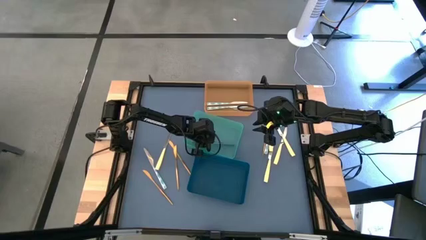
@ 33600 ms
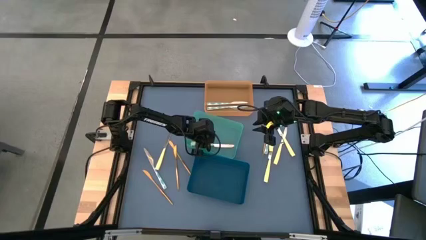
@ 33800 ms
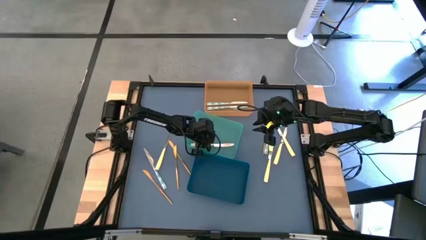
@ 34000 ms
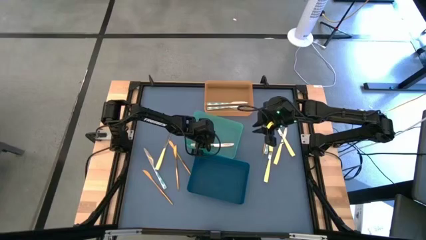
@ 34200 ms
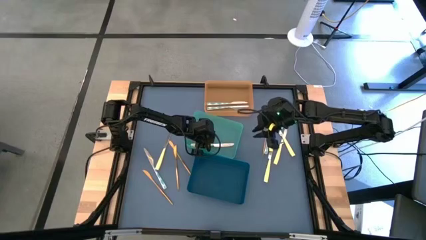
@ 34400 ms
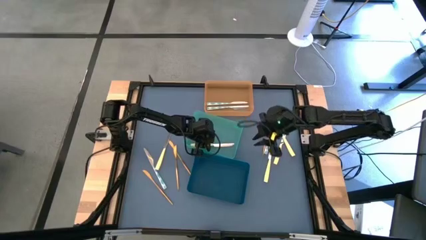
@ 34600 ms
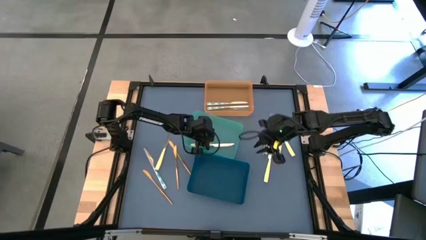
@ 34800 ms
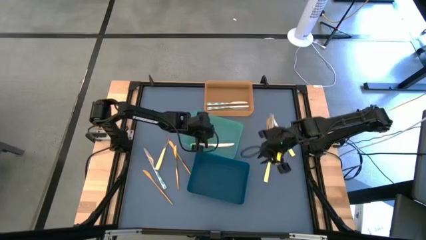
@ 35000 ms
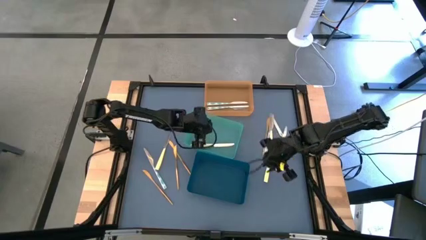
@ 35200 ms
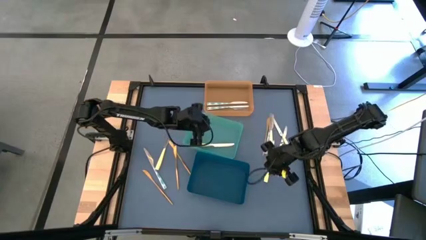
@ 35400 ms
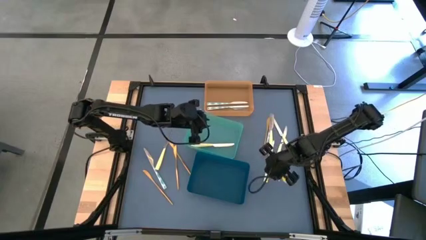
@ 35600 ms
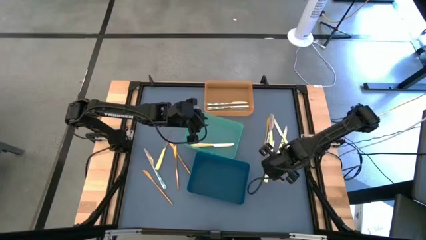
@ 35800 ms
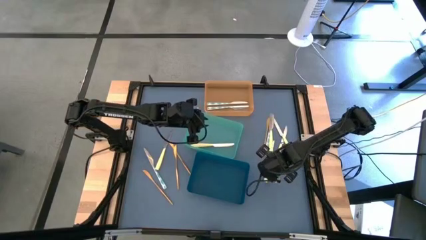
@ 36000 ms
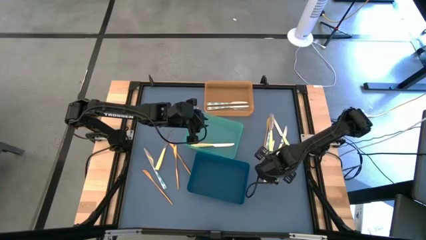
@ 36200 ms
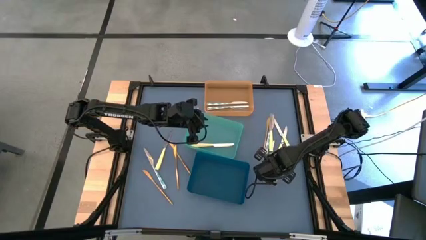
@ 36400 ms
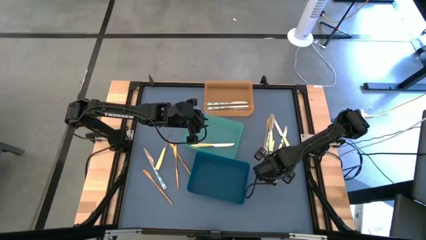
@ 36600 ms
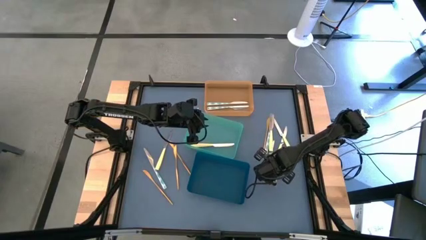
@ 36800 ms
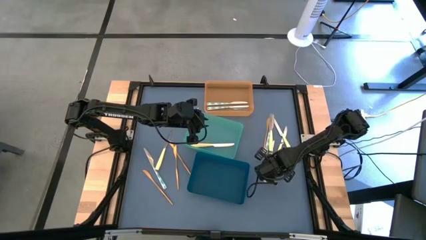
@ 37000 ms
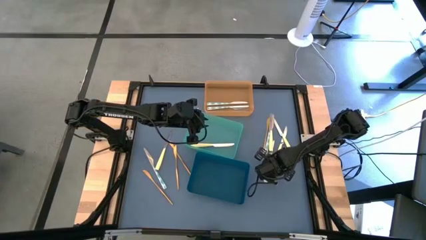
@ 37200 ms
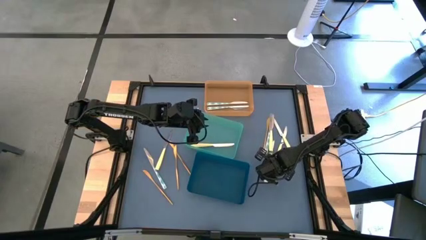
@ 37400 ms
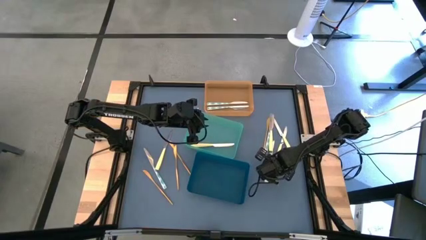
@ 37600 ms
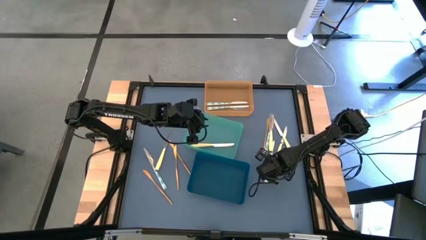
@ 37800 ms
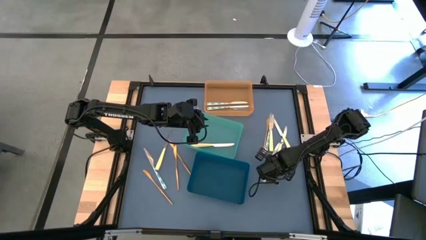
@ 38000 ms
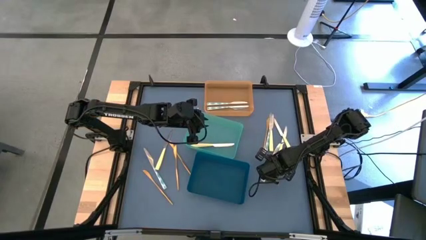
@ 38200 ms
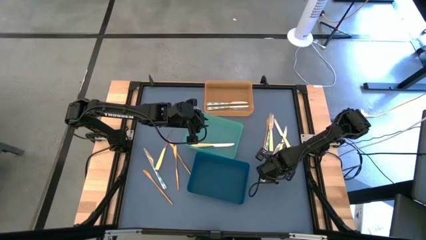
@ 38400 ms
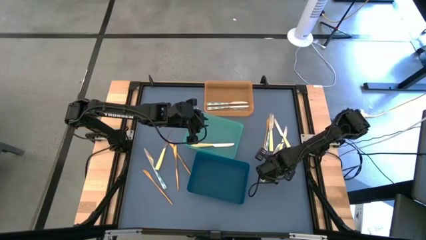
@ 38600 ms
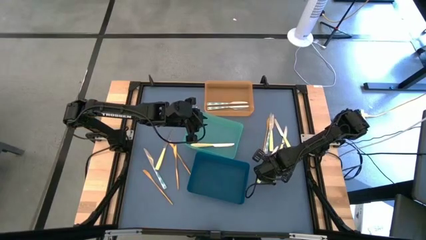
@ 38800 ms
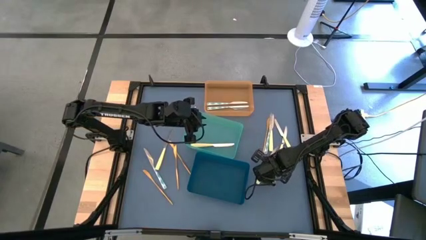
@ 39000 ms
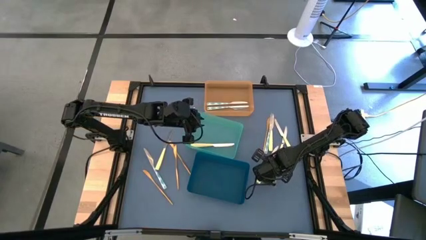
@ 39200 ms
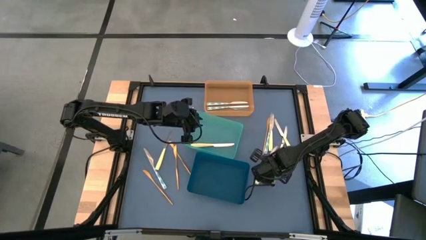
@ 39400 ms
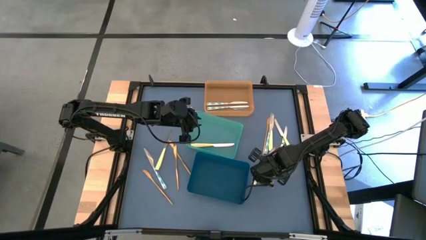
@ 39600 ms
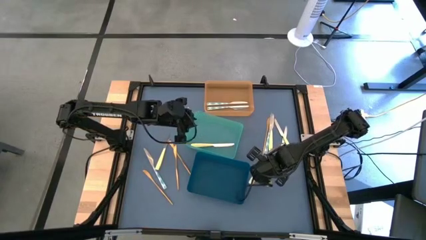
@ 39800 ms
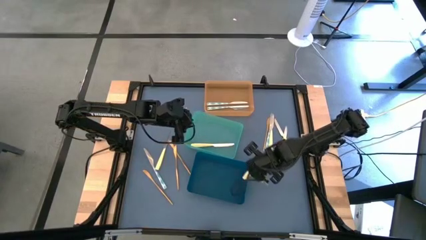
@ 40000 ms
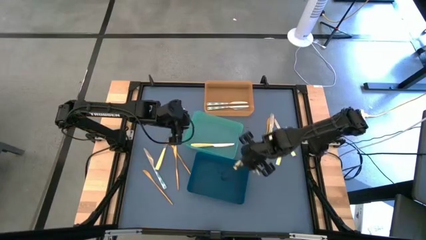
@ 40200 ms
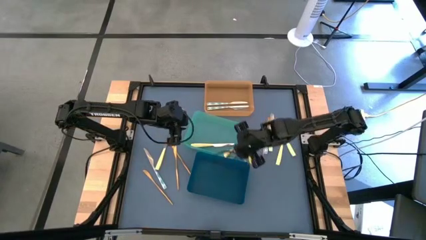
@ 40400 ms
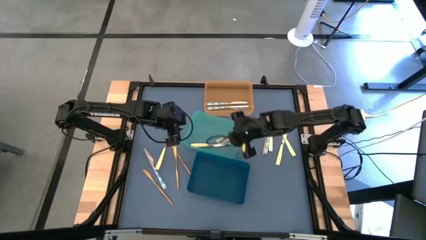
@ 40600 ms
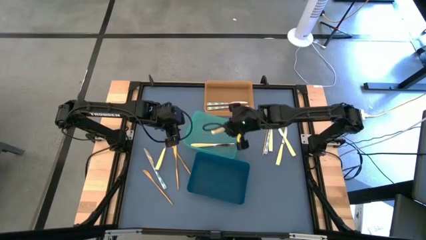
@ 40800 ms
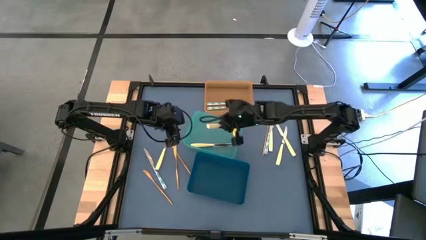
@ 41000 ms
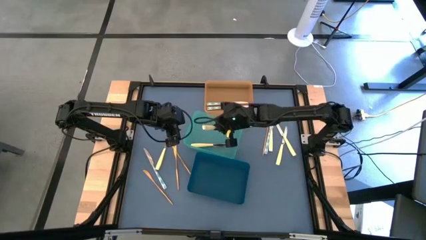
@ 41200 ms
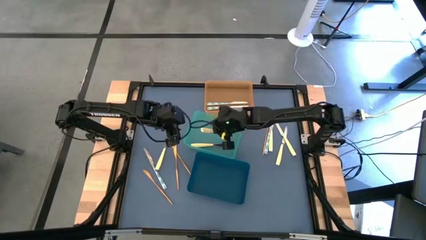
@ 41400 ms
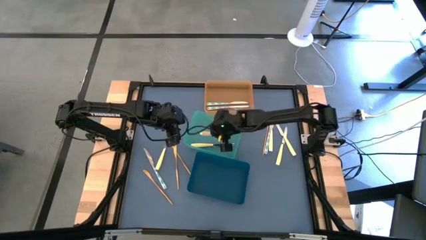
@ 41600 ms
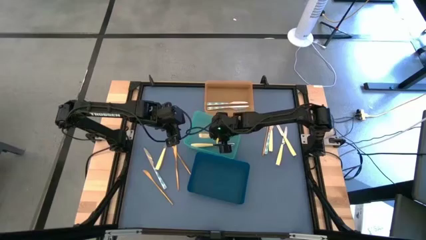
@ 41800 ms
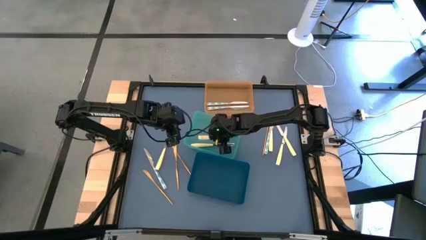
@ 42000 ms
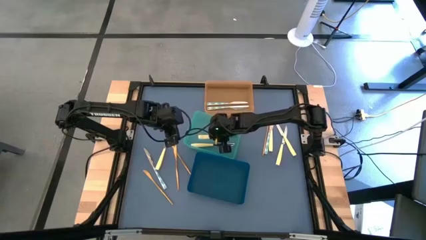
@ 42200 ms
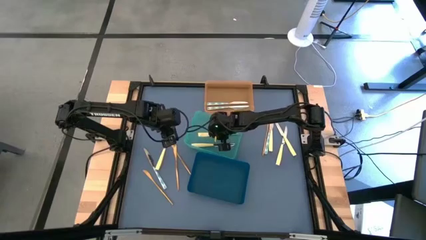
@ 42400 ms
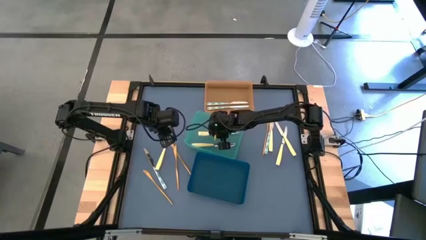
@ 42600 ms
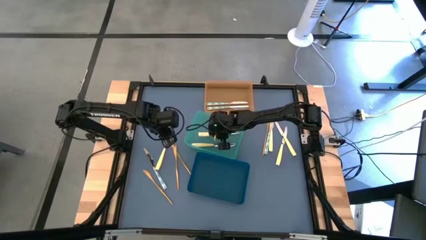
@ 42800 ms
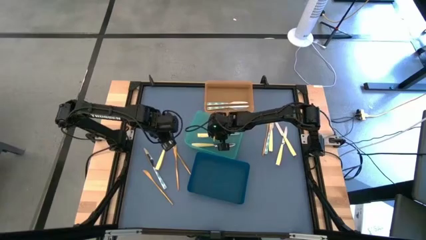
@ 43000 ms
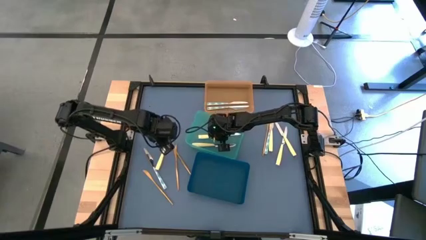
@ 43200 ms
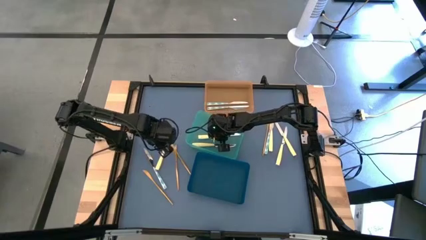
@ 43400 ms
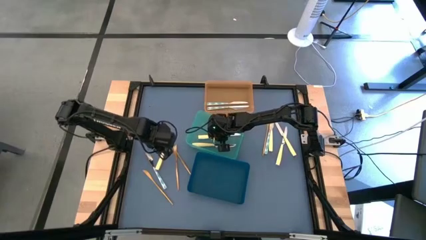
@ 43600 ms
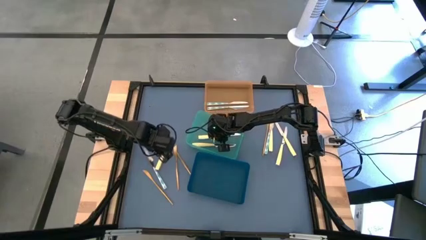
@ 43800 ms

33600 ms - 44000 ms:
Task: Sort silverware by color (type)
Put the yellow knife into the green bin
